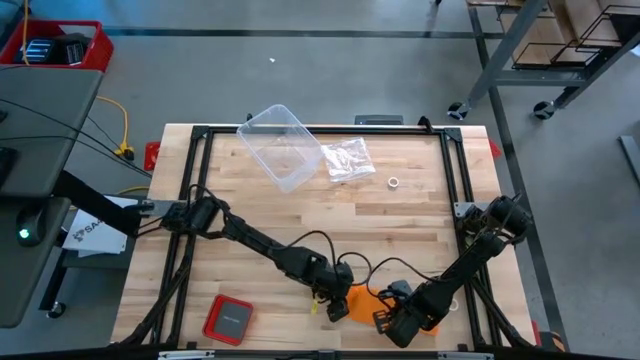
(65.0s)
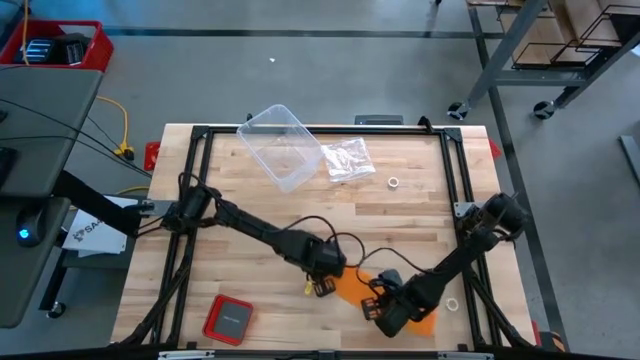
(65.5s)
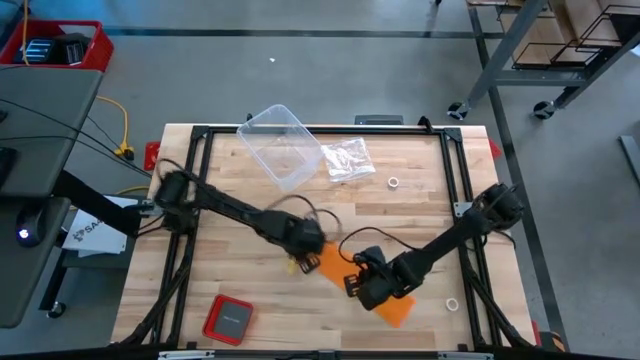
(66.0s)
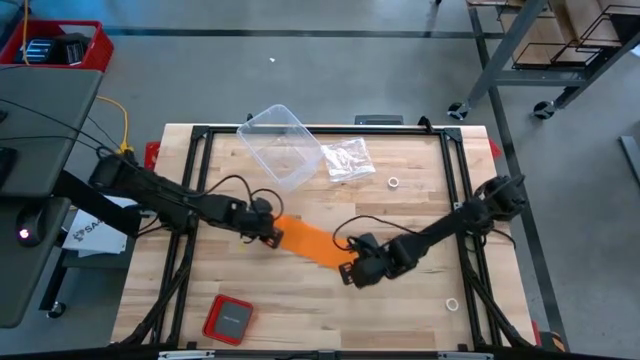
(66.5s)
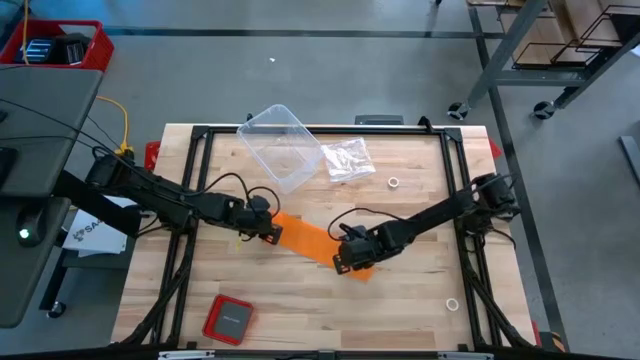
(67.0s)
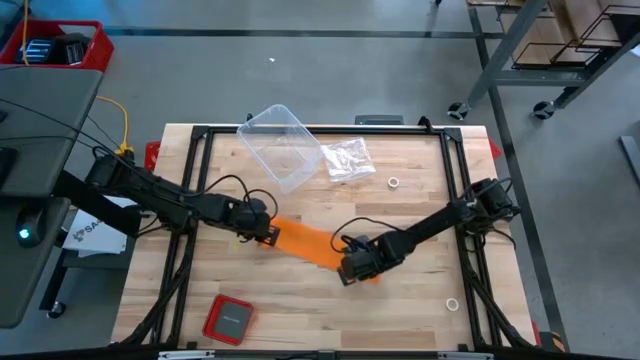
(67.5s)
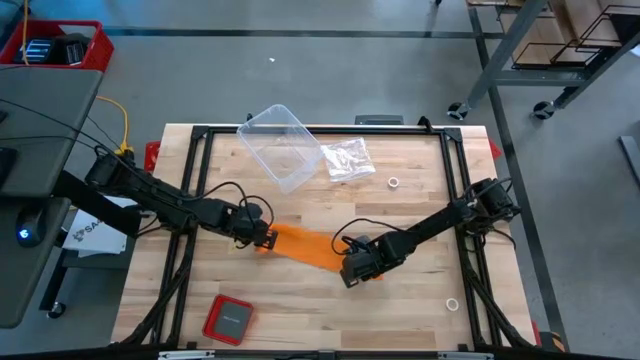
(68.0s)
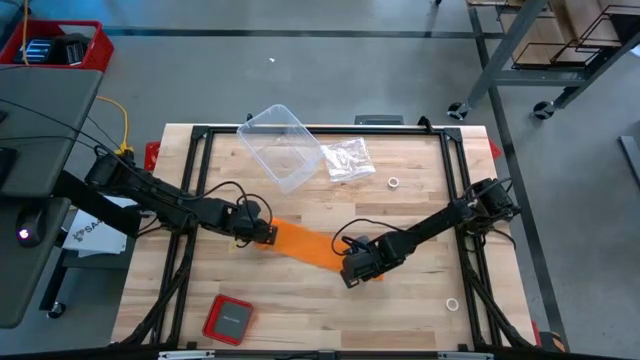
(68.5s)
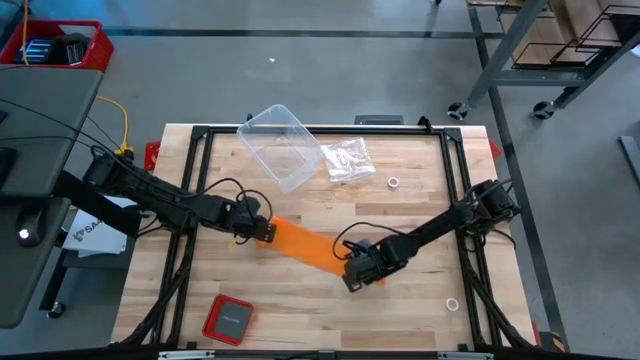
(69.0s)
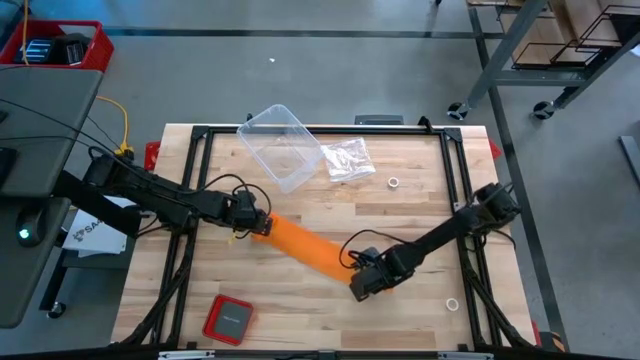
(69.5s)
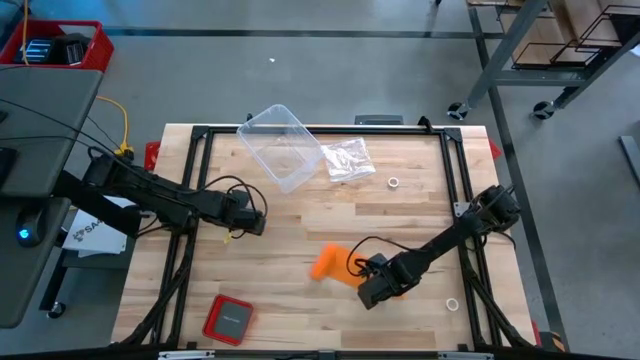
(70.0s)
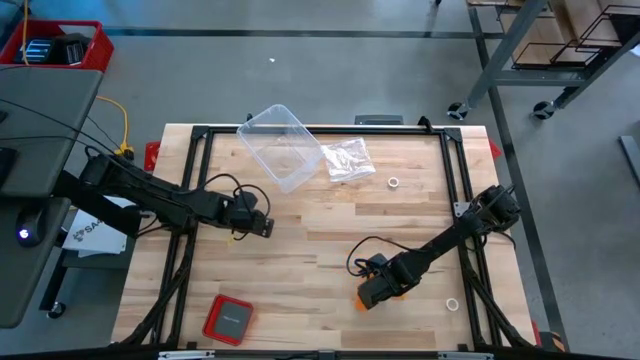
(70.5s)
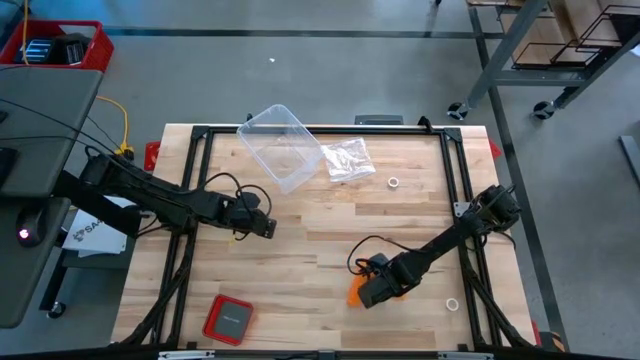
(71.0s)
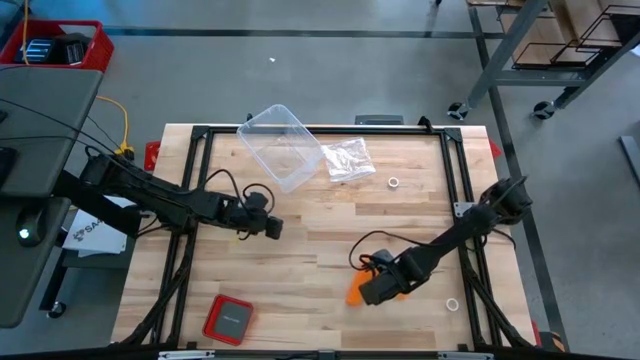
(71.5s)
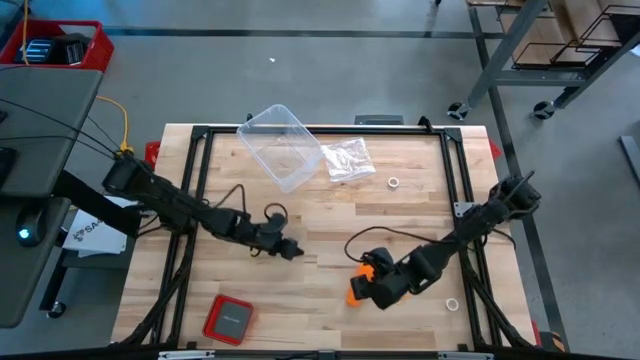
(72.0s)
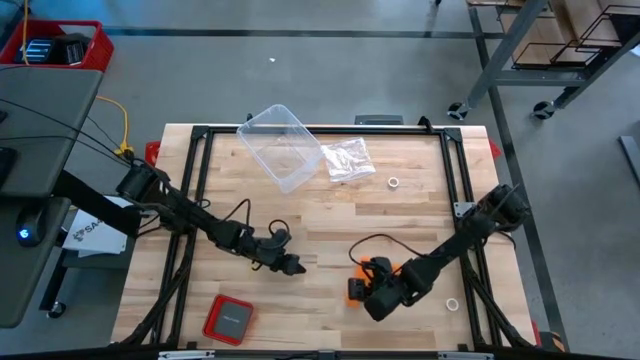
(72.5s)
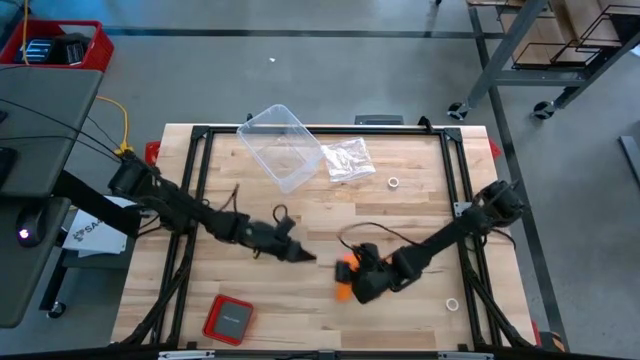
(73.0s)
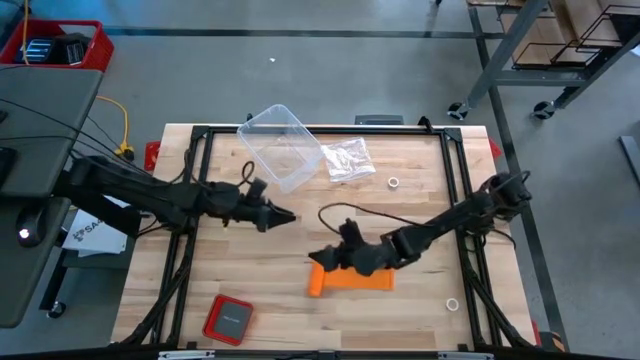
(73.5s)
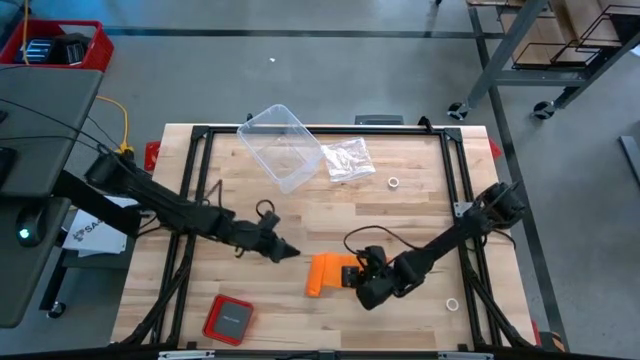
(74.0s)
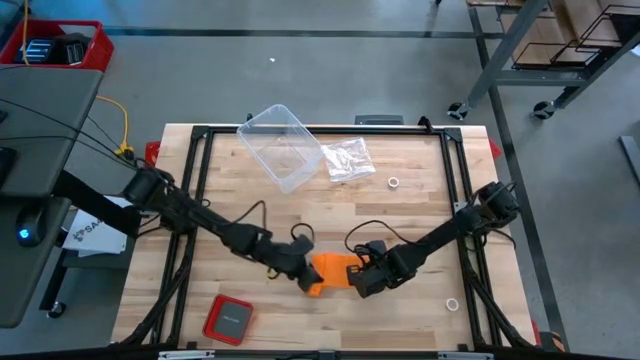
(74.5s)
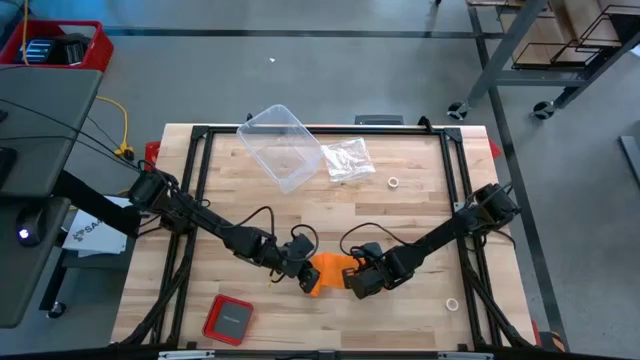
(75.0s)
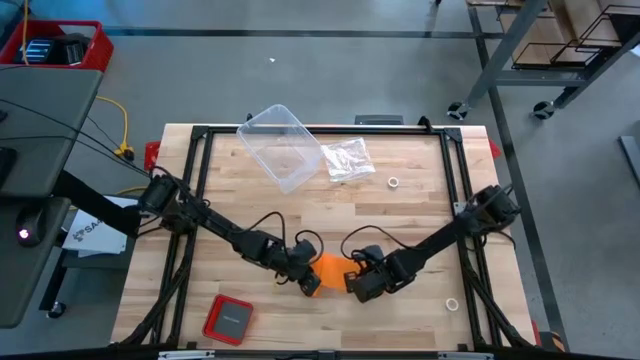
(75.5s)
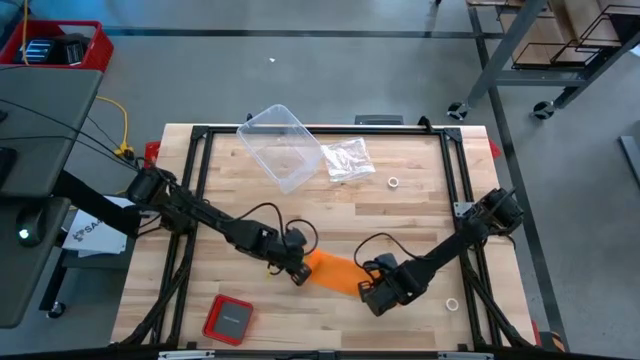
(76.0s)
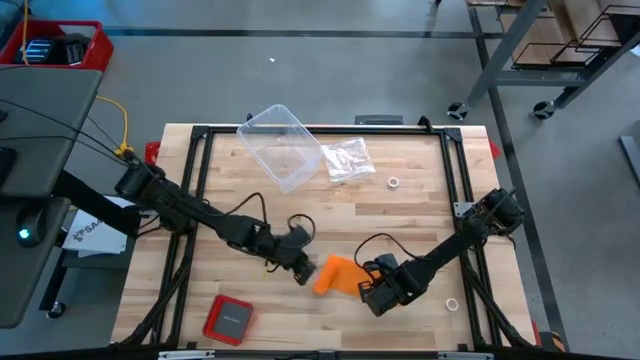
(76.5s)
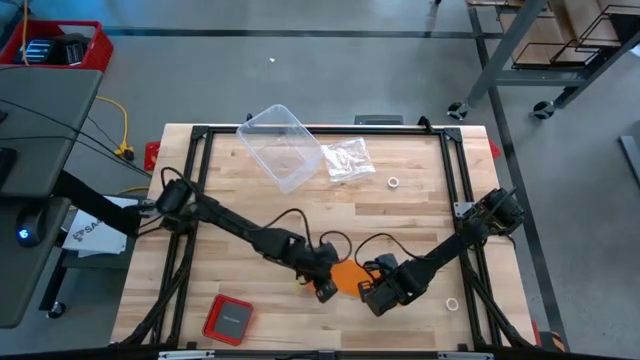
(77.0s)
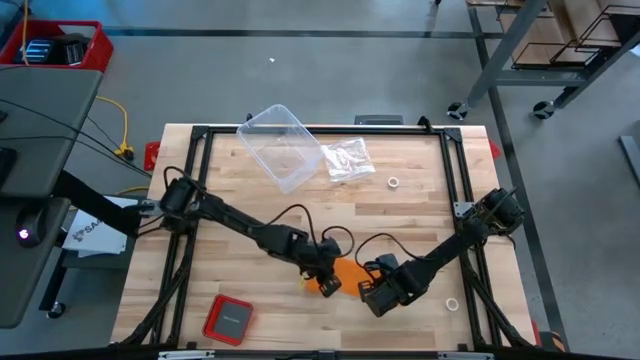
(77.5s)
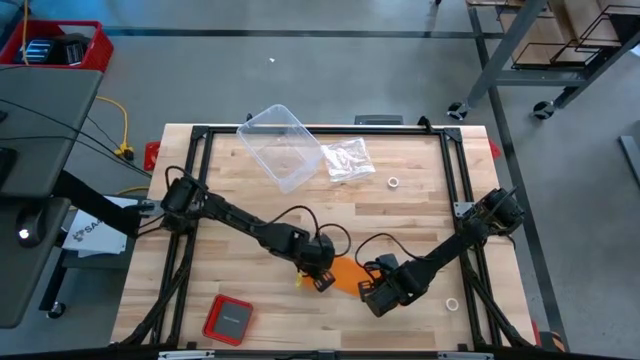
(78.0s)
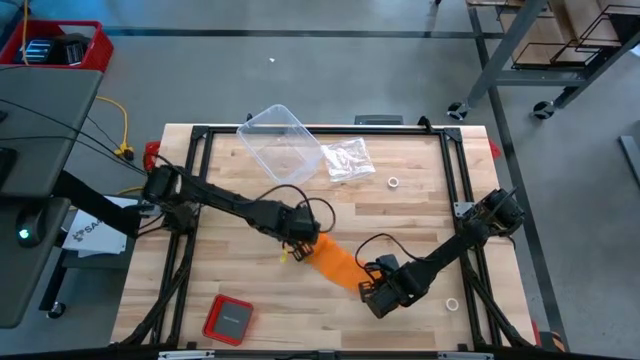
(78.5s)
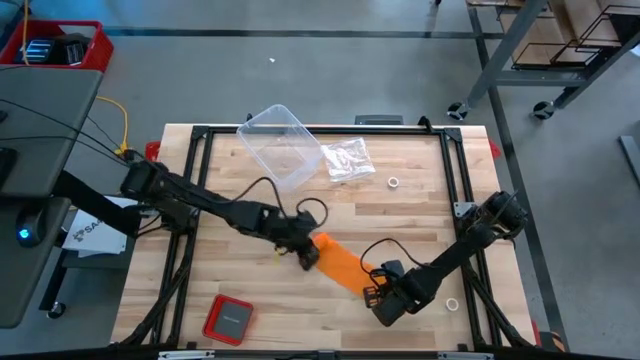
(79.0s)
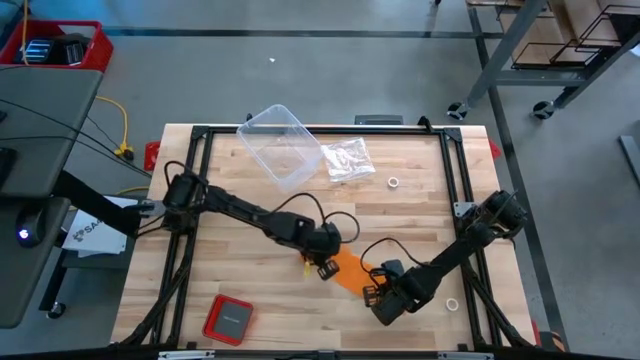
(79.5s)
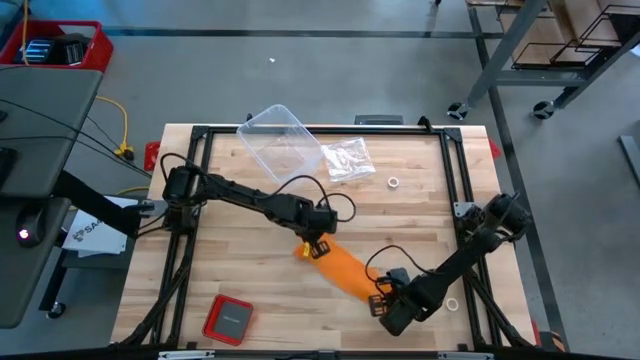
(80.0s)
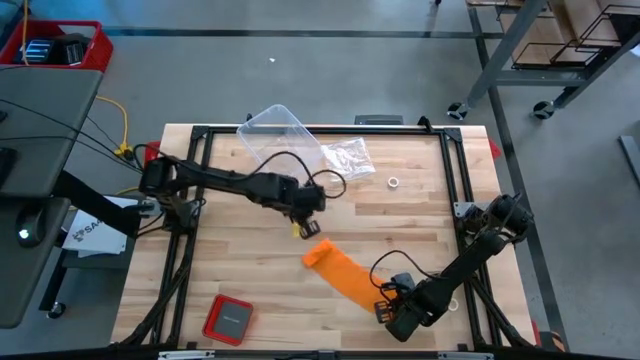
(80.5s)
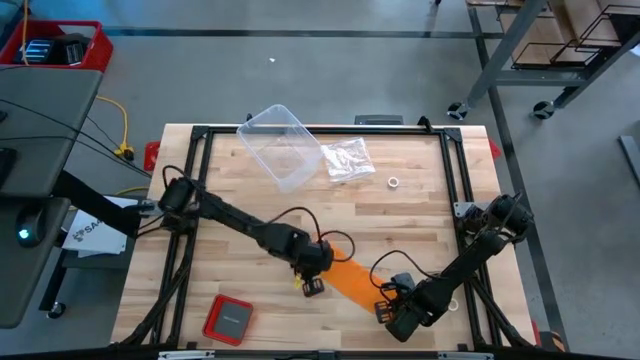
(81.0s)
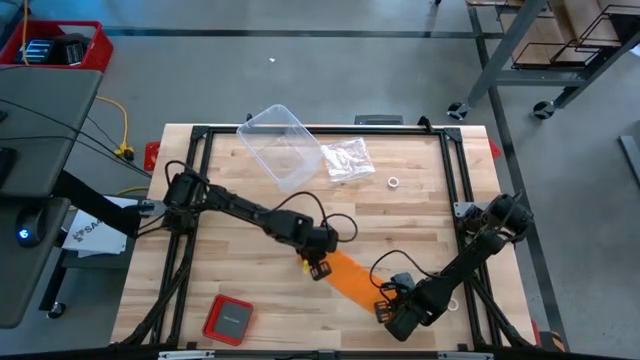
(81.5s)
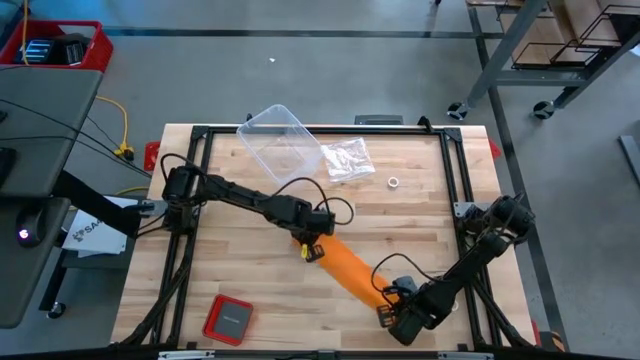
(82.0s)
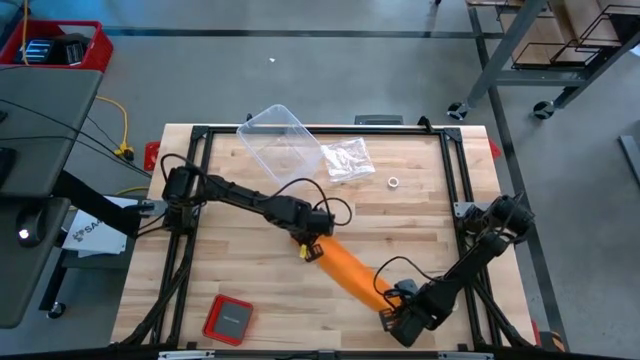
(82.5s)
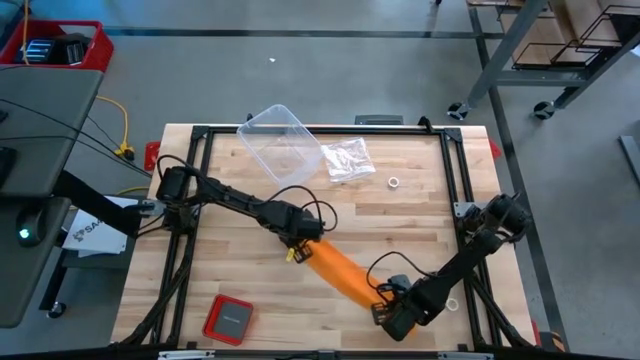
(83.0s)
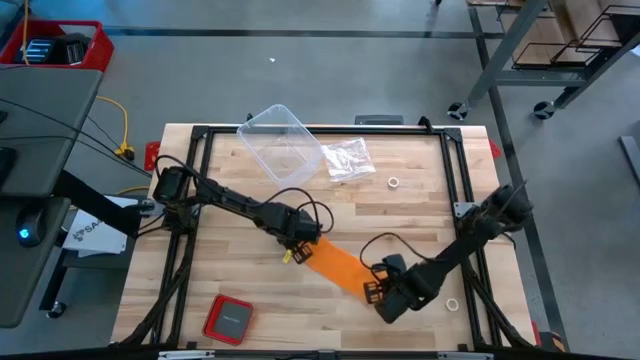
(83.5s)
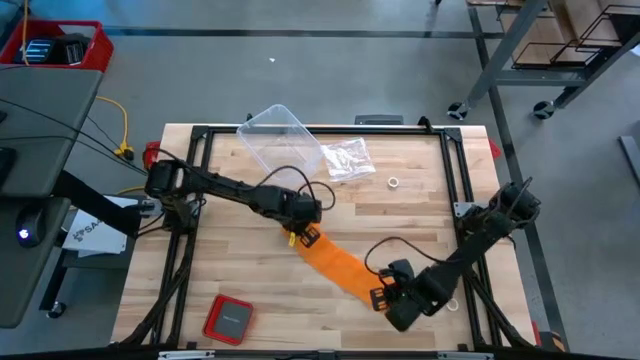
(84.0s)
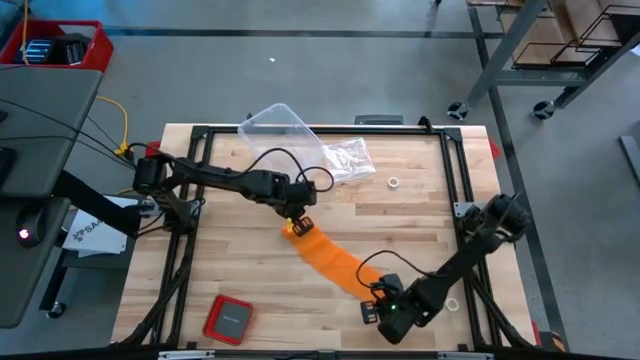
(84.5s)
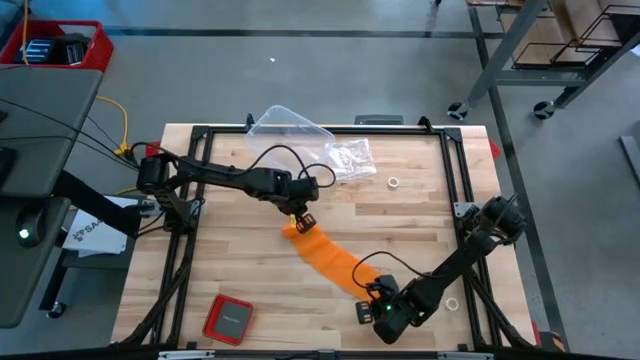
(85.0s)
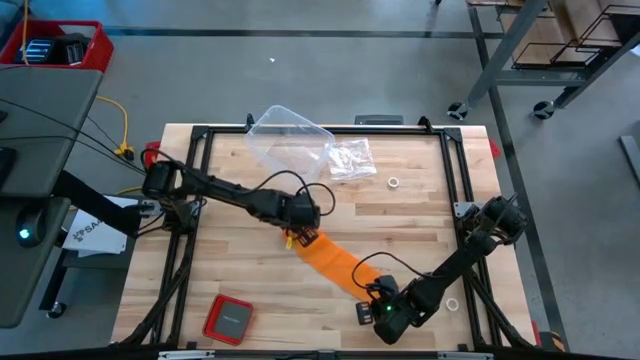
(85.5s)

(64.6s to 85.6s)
Task: Roll bandage
Roll the orange bandage
